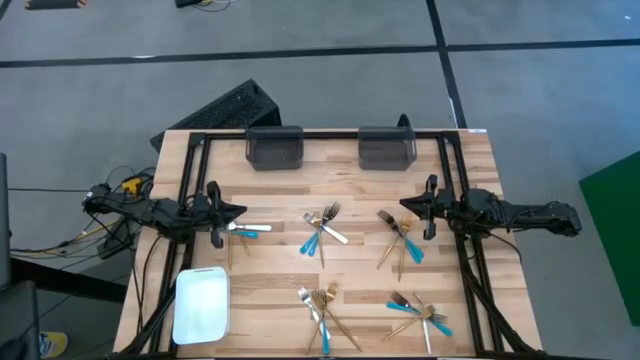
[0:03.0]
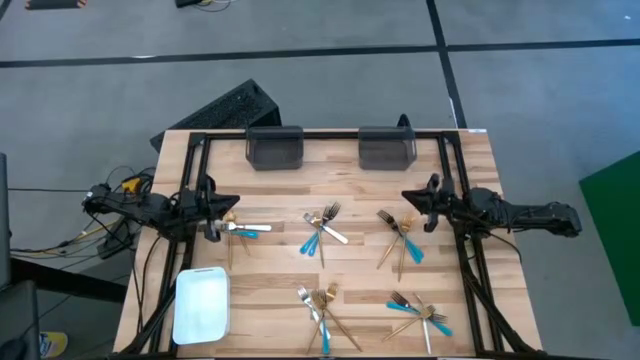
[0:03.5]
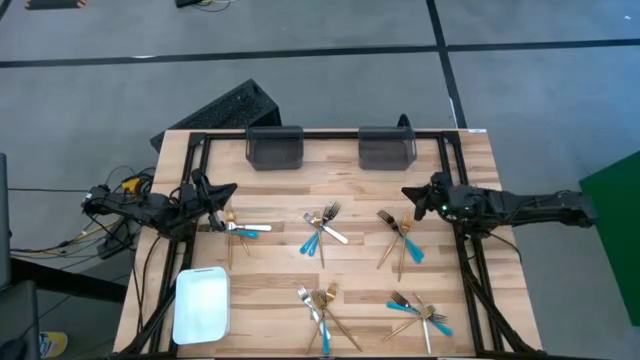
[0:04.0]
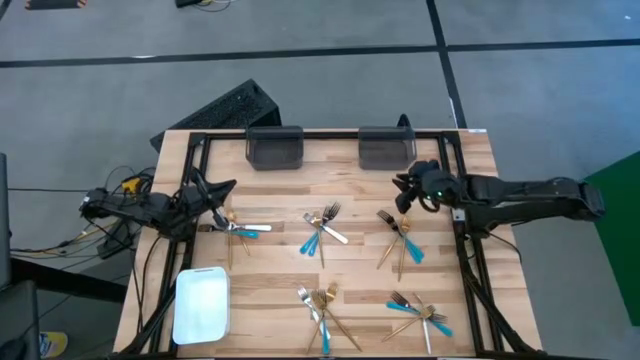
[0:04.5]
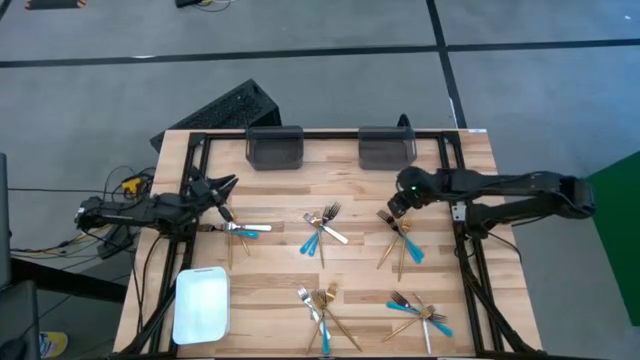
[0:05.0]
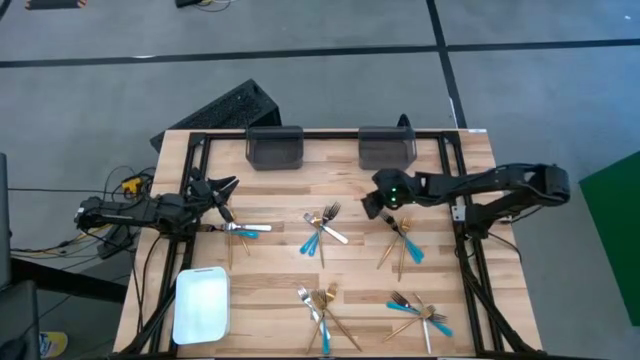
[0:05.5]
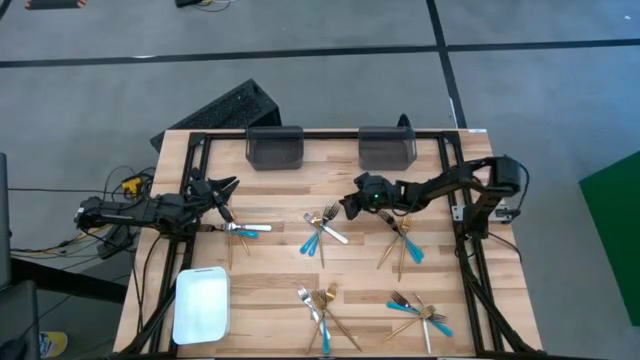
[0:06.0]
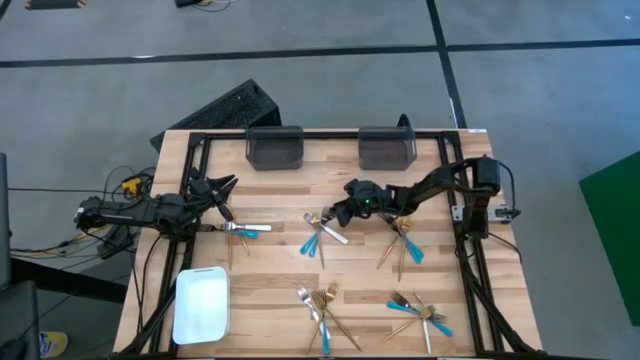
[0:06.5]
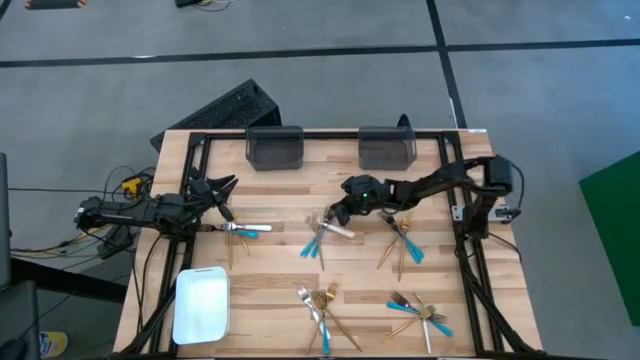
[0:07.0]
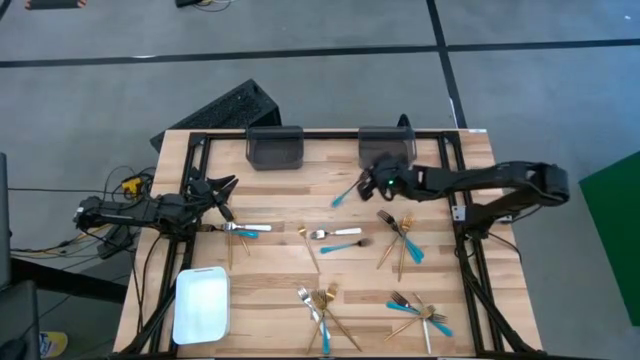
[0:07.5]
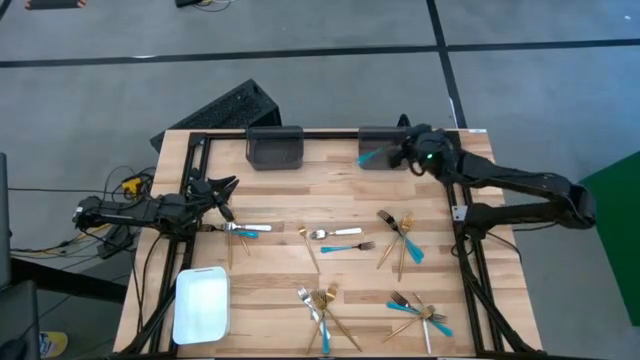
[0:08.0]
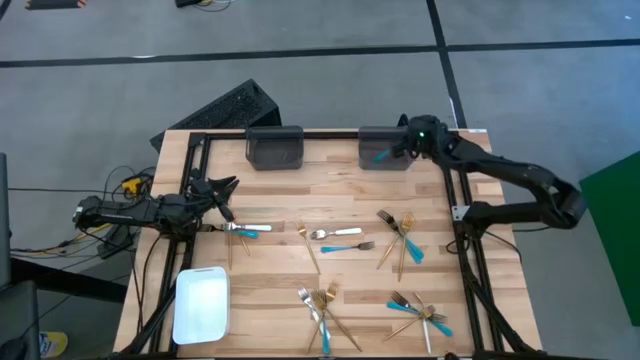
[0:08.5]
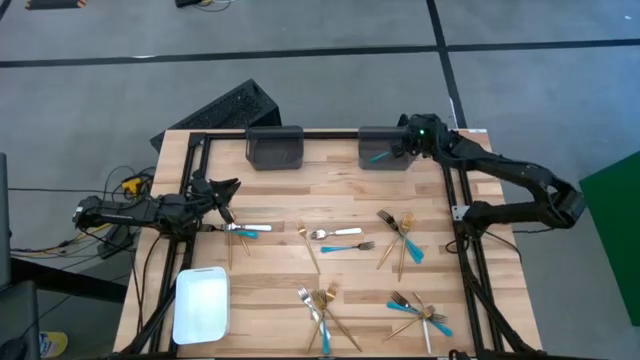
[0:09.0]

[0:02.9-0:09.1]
Task: Sort silverware by color (type)
Put the blue fork into the right black bin

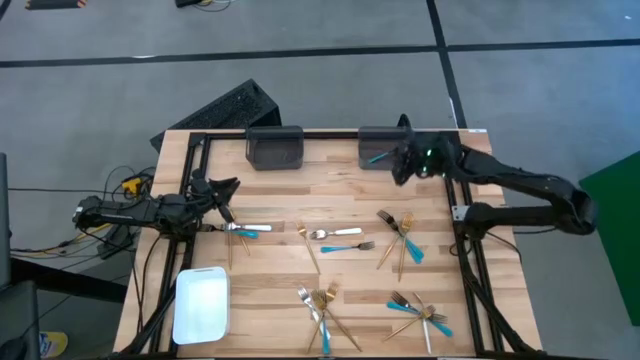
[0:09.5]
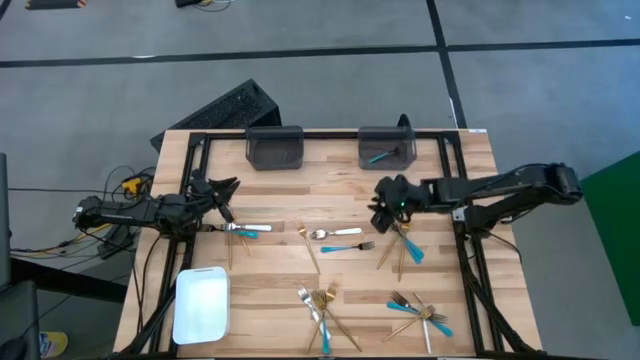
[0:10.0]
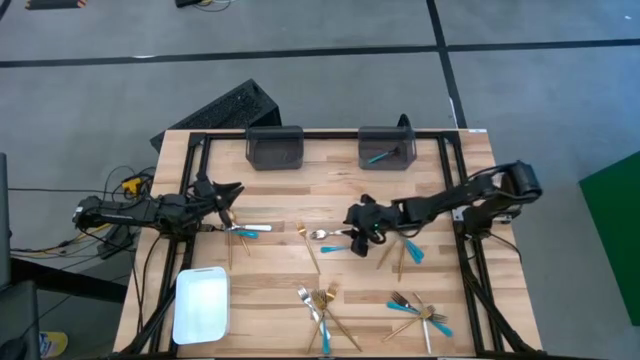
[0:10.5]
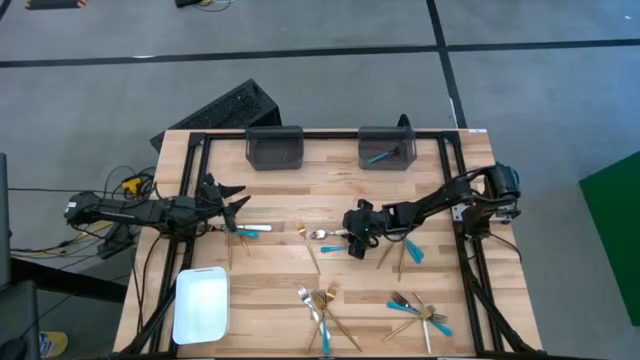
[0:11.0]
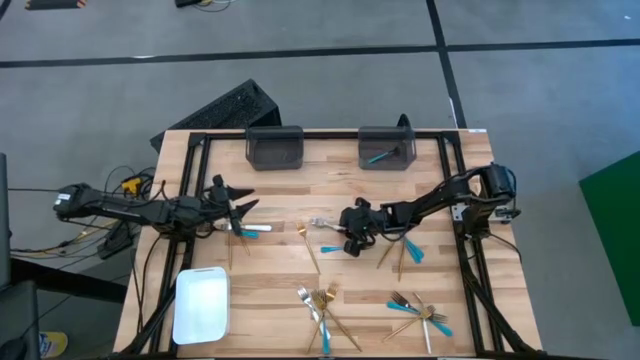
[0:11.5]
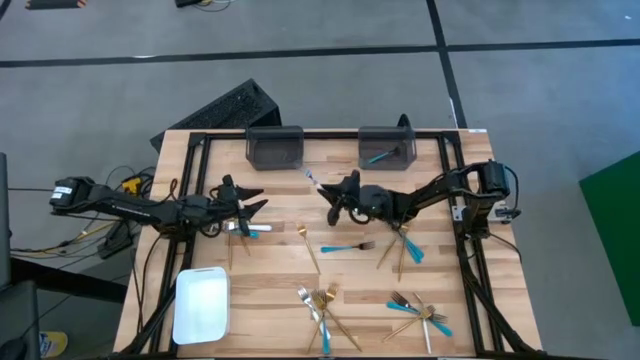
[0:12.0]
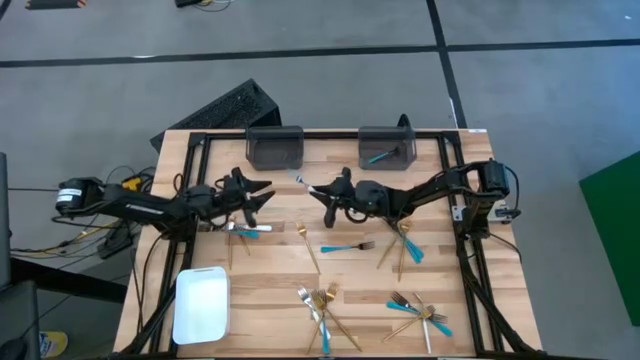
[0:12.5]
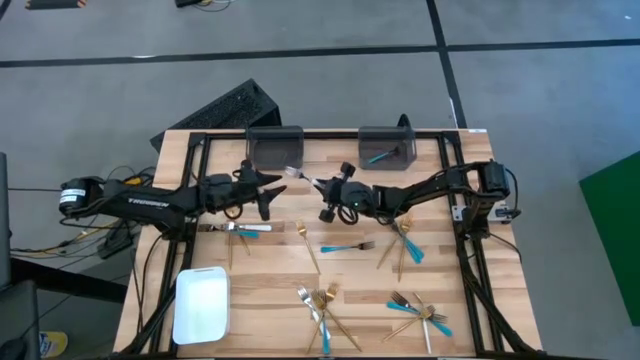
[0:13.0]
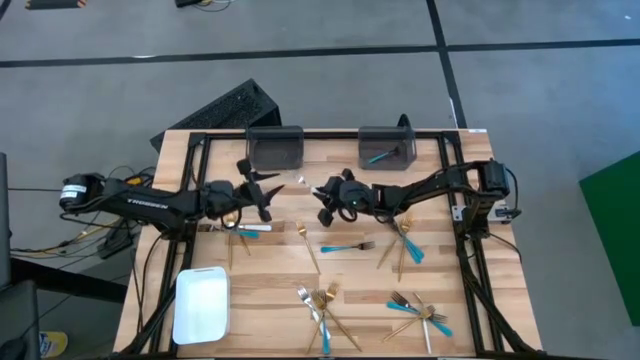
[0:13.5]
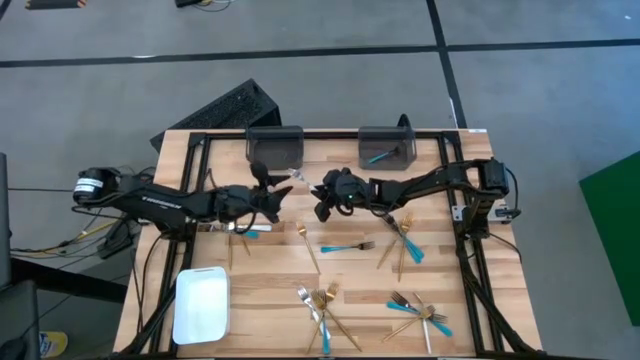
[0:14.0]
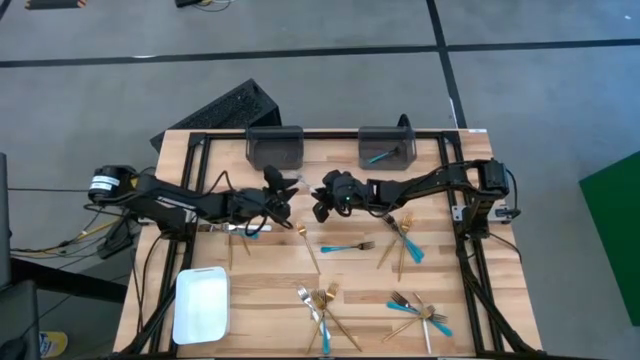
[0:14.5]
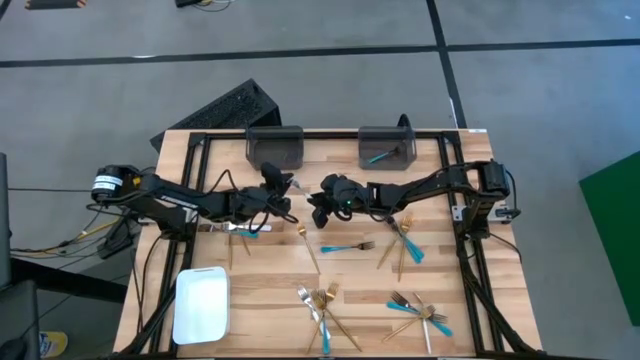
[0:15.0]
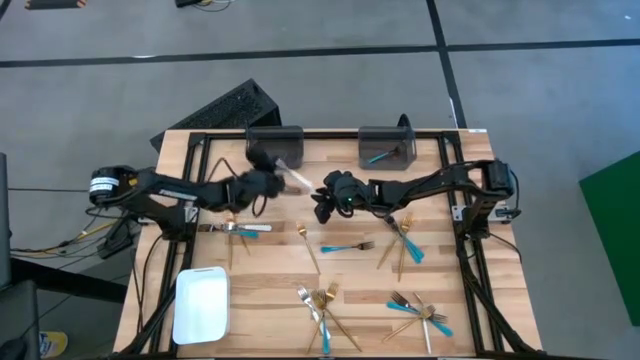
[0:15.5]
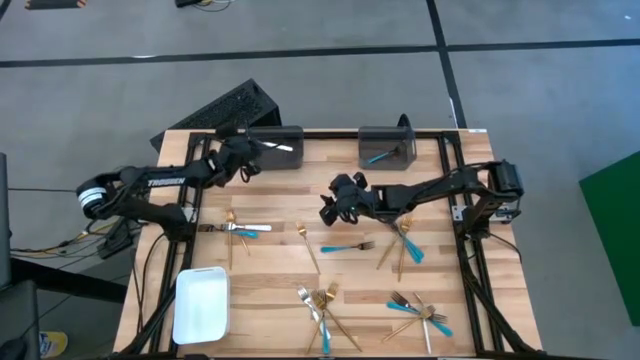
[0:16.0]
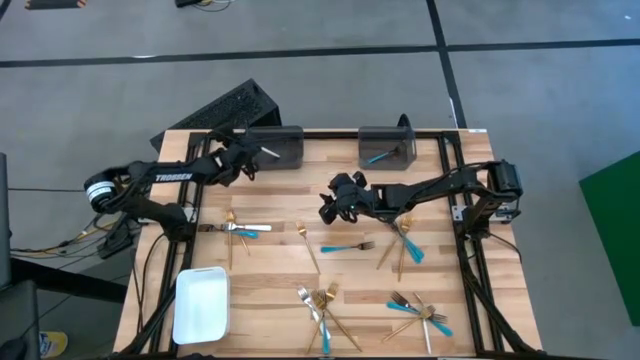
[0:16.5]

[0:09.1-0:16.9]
Put the white fork into the left black bin

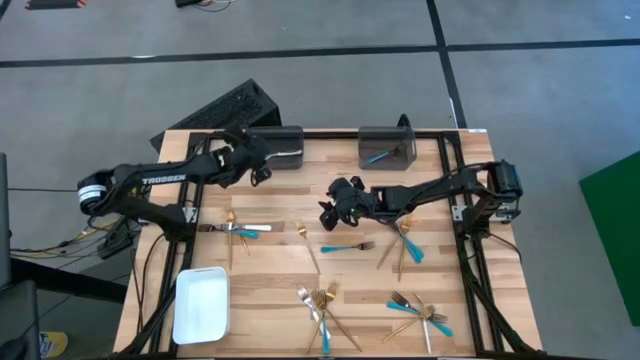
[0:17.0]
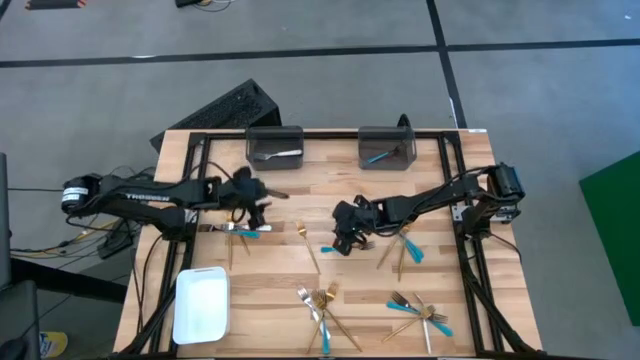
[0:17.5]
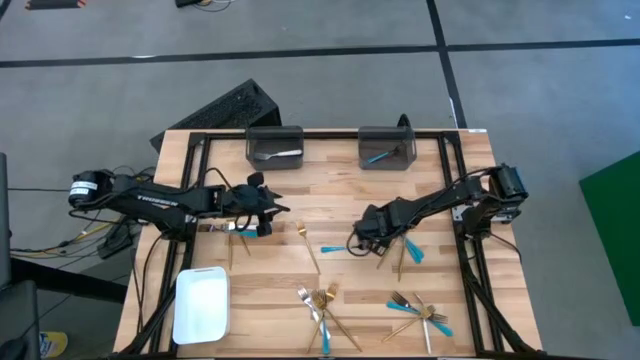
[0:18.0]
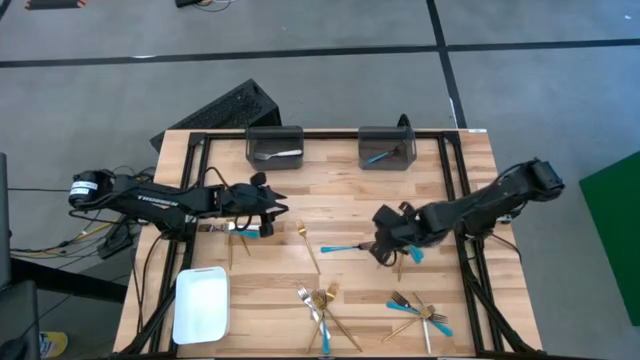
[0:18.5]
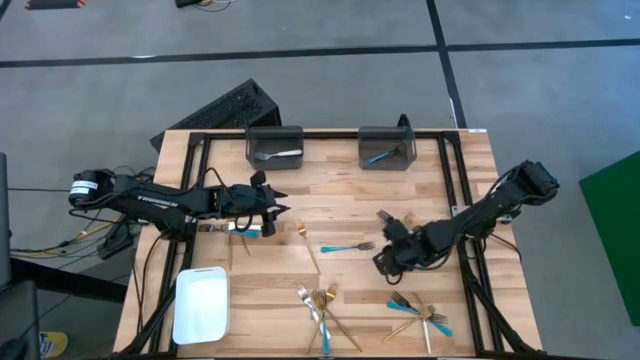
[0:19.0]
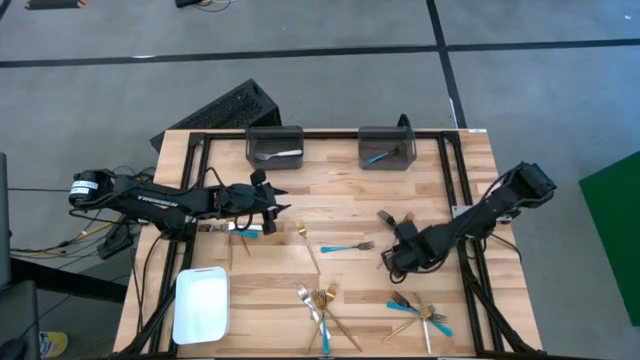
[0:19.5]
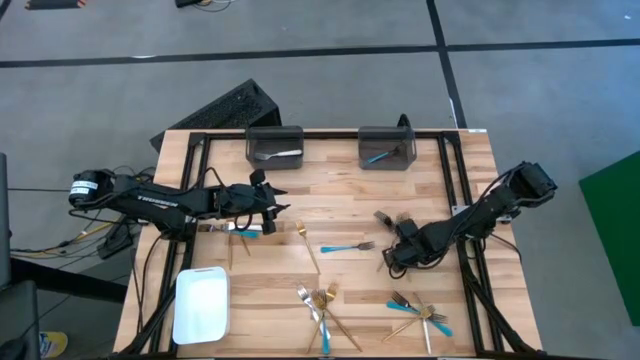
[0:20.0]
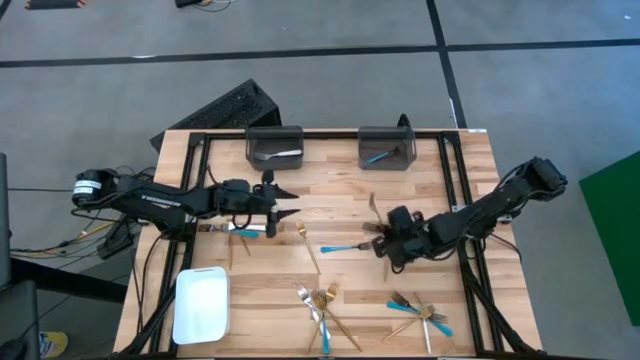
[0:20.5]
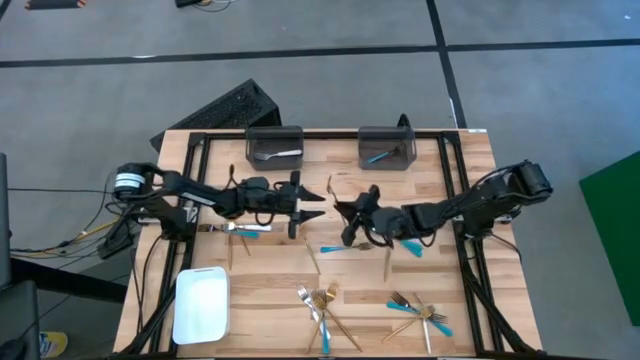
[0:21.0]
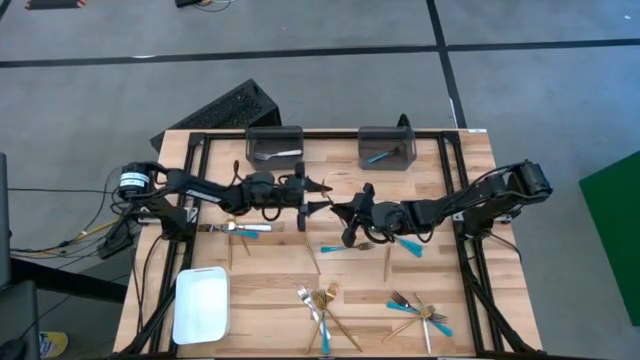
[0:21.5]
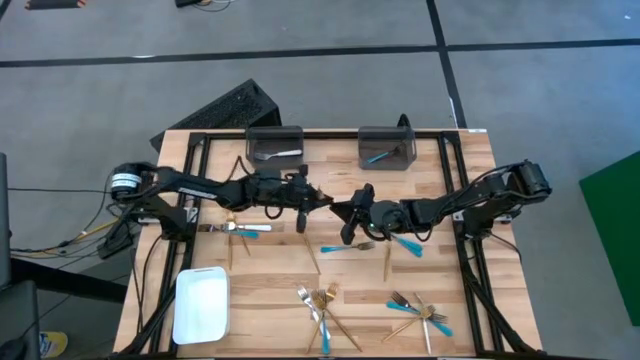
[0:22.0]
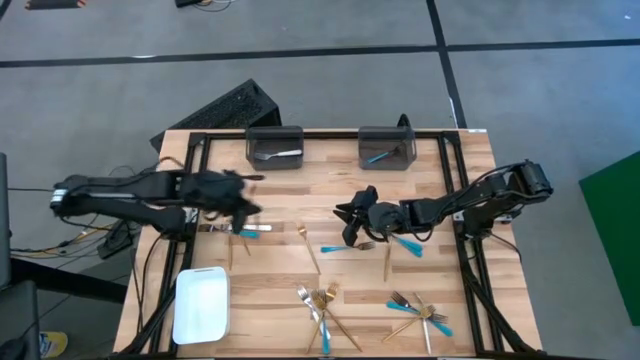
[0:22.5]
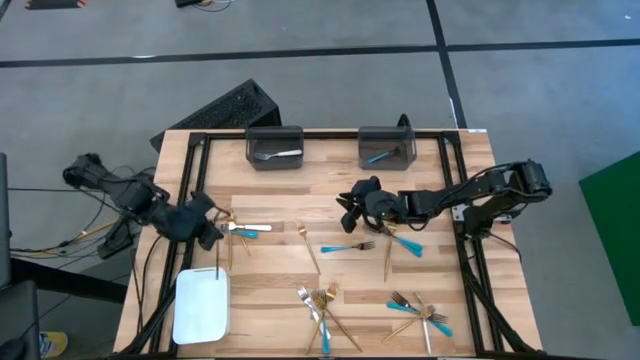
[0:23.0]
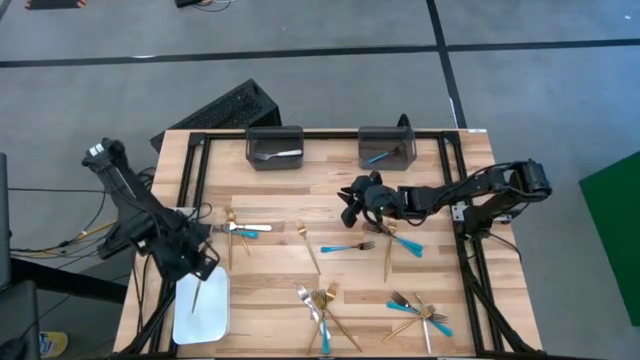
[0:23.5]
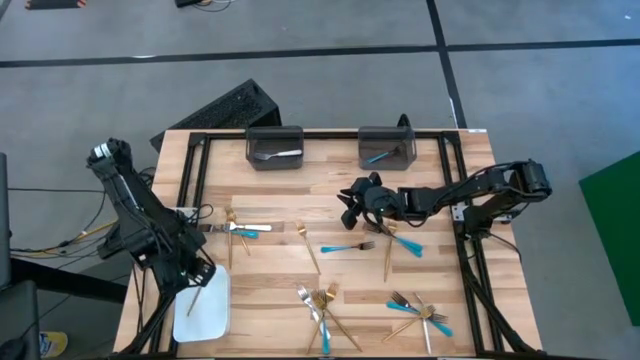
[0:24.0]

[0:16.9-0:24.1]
Put the gold fork into the white bin
